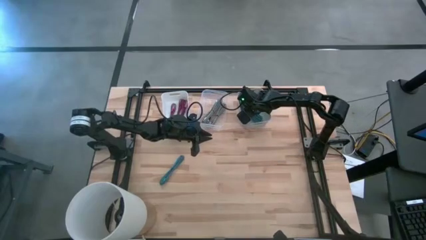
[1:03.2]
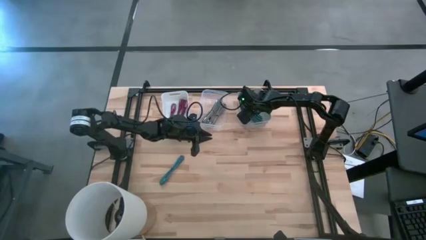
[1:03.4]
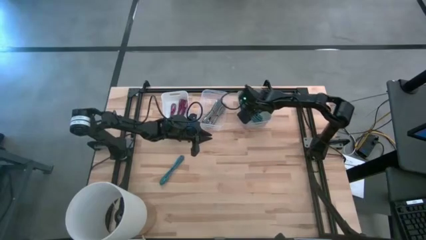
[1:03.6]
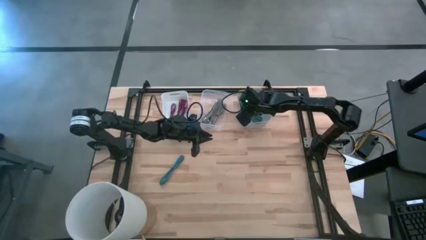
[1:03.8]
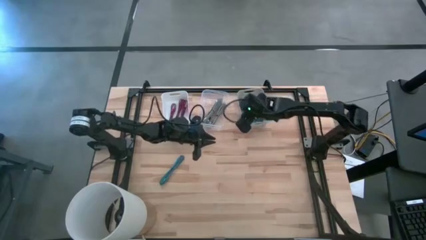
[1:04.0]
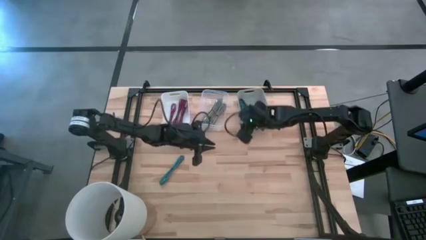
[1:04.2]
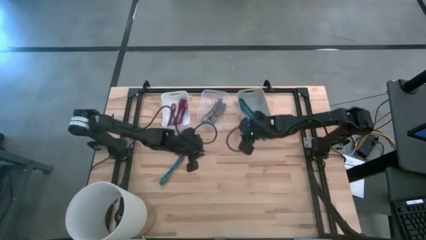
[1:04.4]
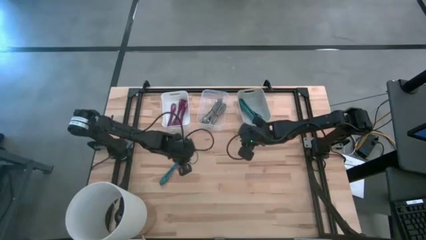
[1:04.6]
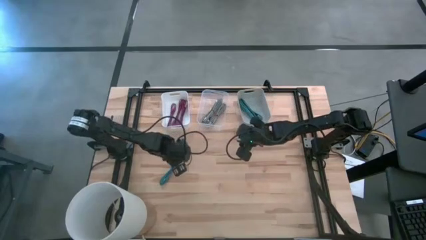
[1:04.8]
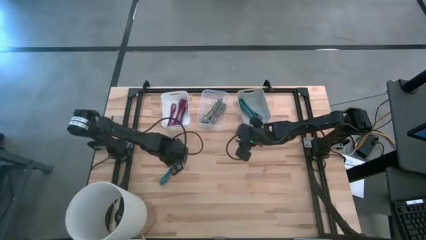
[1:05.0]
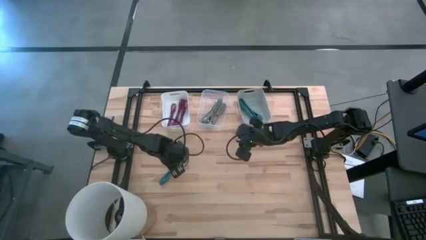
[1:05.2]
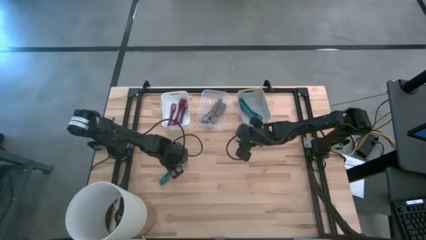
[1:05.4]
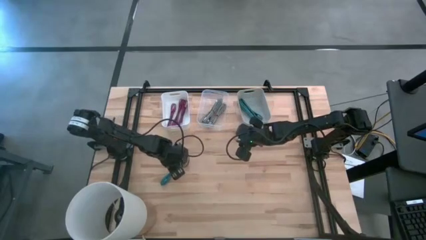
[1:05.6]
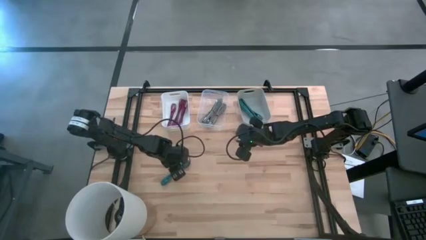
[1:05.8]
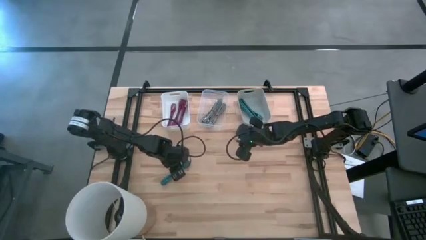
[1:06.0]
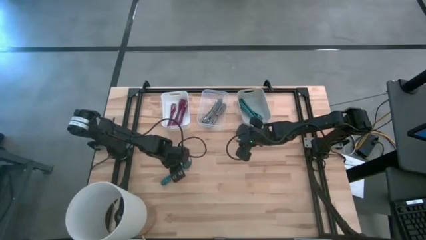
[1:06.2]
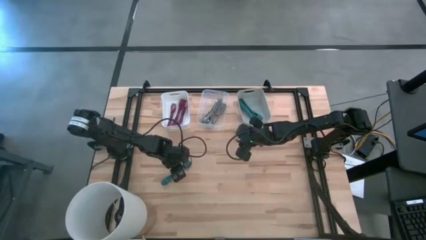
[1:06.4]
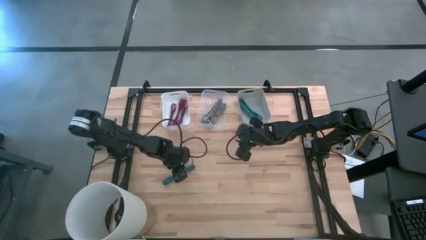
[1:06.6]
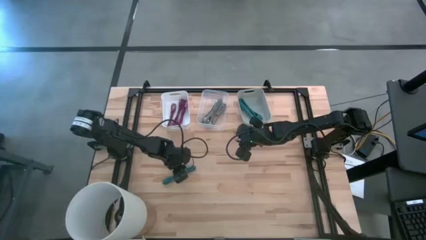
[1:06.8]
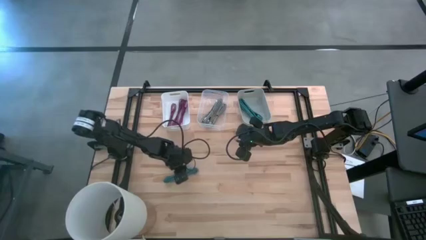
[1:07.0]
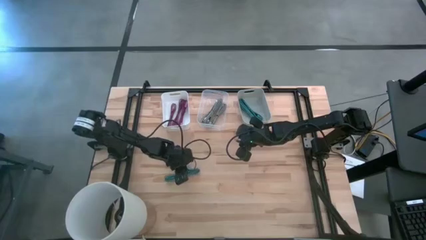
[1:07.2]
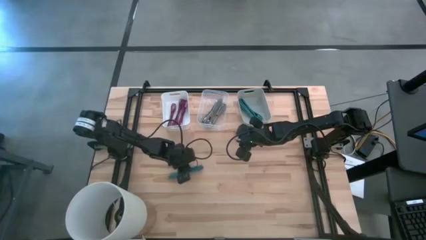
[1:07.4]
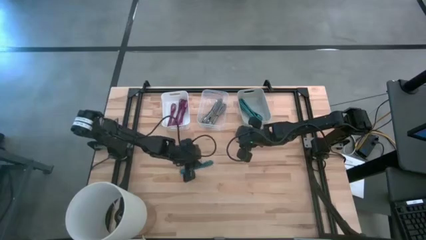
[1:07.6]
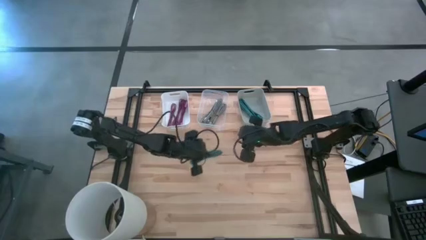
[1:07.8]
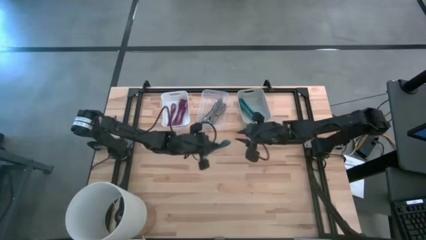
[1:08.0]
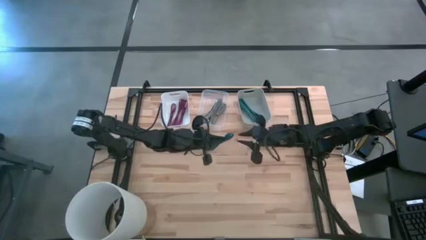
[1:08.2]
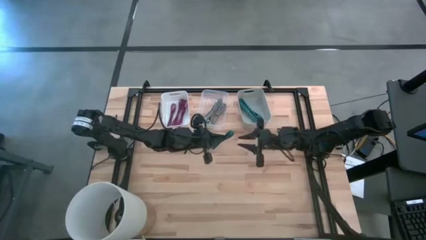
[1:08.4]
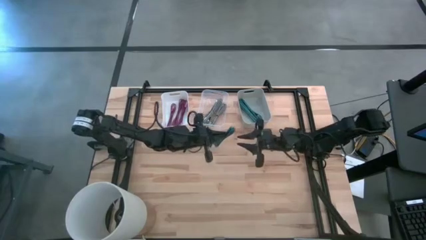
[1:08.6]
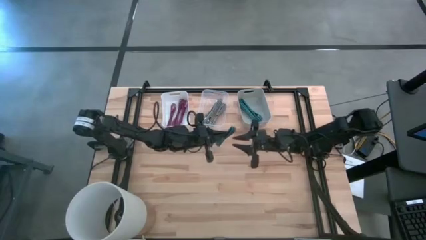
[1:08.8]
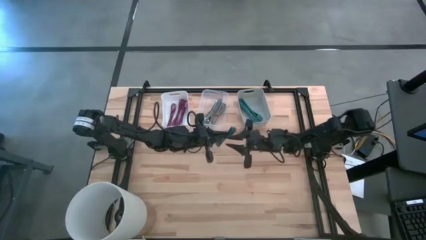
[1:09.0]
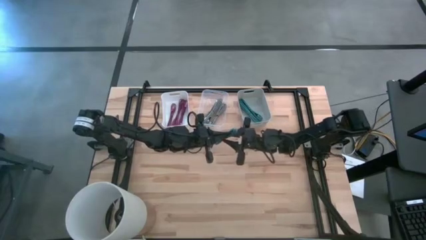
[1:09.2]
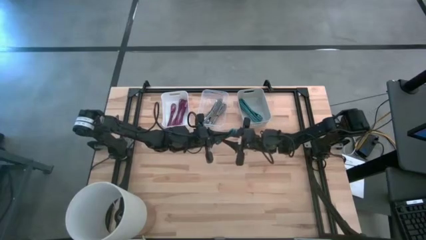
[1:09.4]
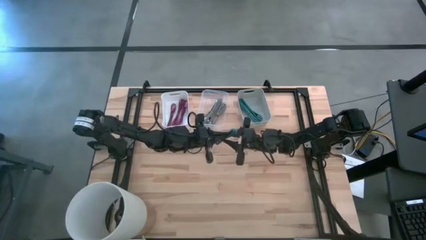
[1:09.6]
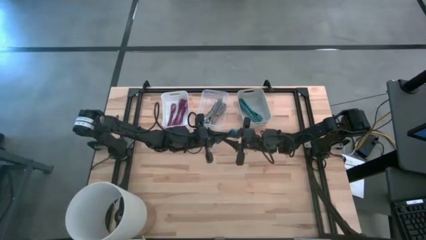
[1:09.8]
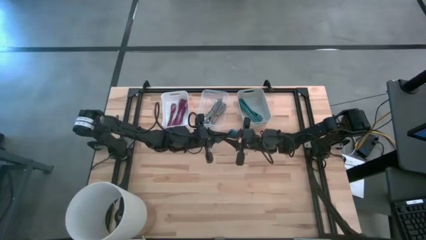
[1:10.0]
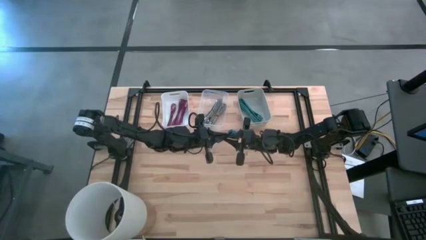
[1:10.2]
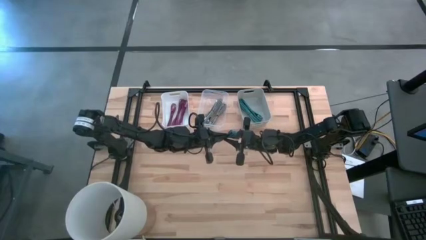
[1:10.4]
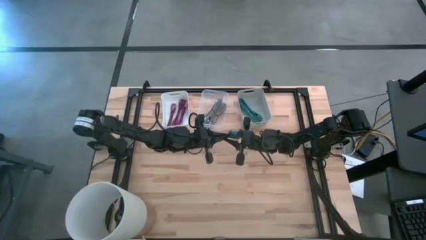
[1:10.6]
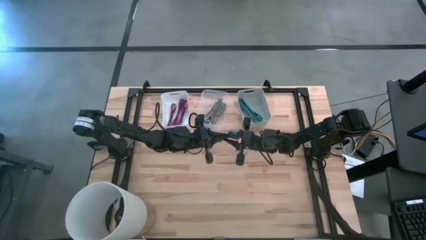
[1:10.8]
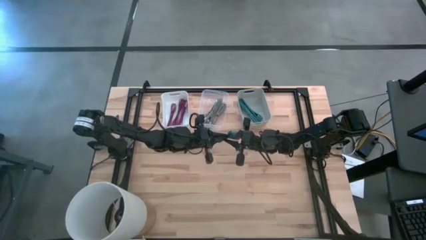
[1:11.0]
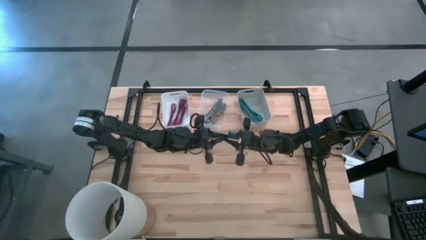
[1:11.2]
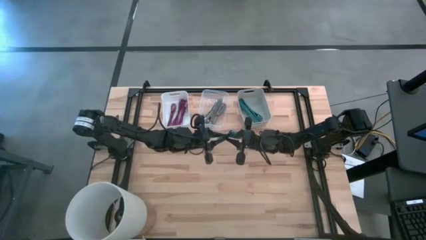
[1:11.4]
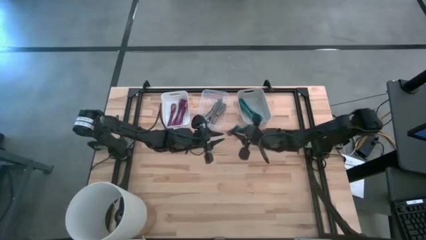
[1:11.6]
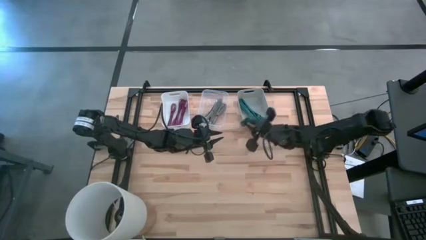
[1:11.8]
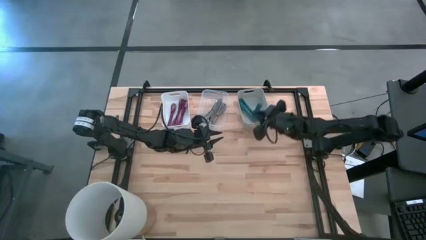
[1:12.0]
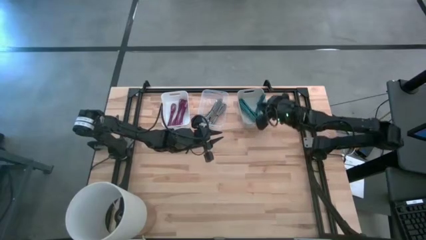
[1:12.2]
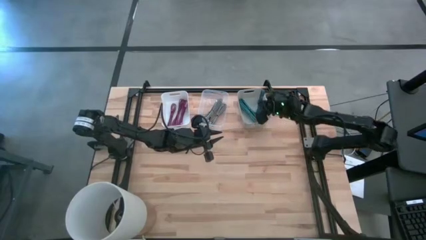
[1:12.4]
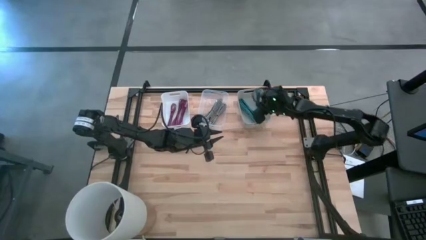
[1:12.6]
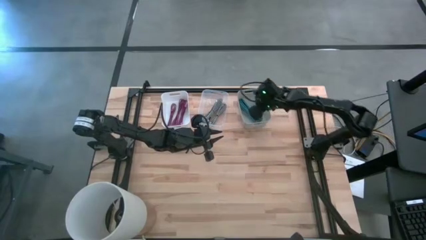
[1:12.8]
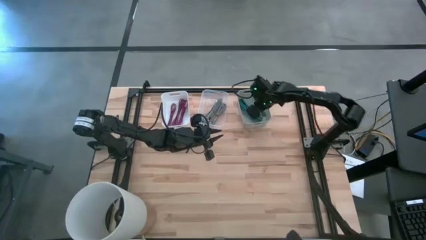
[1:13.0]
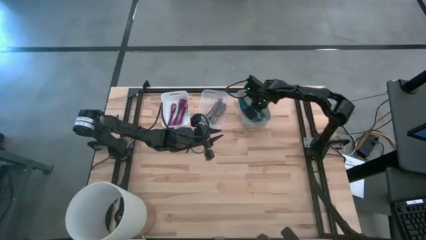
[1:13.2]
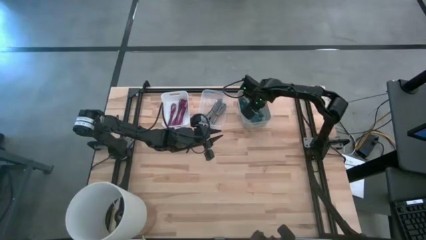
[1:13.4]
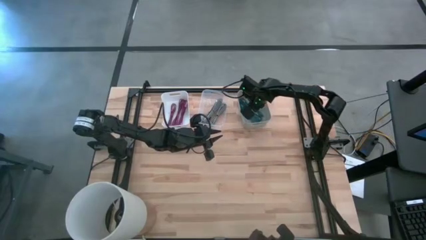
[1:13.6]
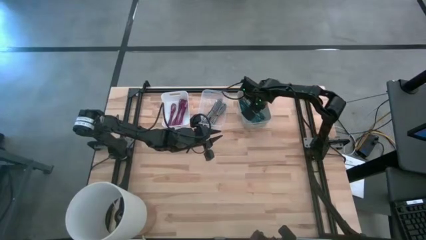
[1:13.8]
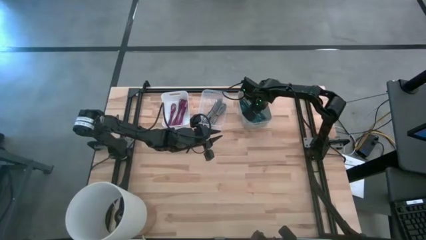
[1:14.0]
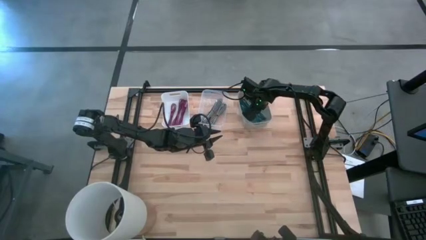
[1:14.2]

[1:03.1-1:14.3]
Task: Pick & Place USB Port
Put the blue charger cable into the gray bin

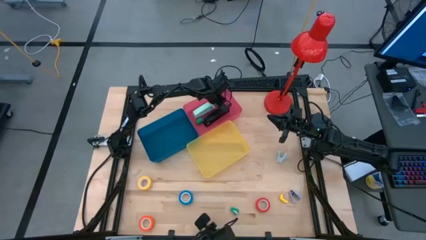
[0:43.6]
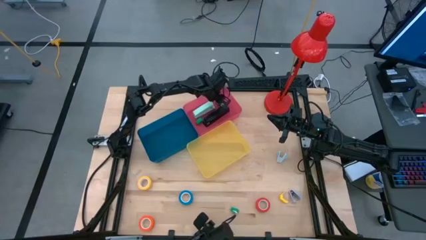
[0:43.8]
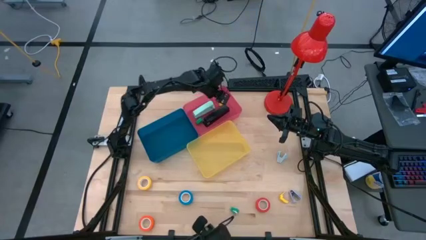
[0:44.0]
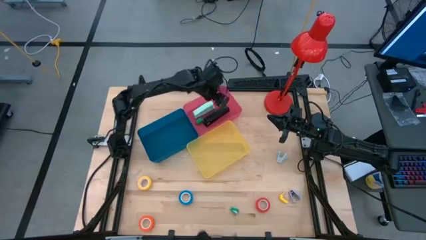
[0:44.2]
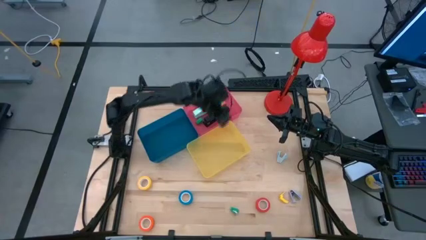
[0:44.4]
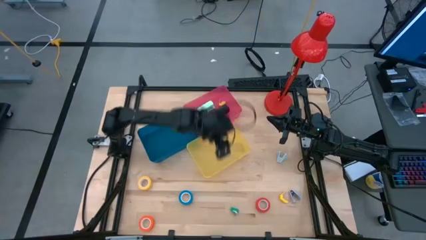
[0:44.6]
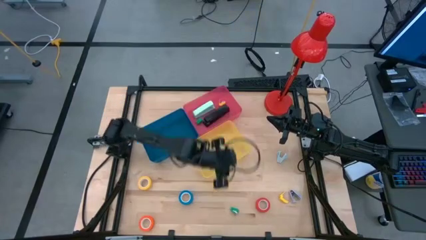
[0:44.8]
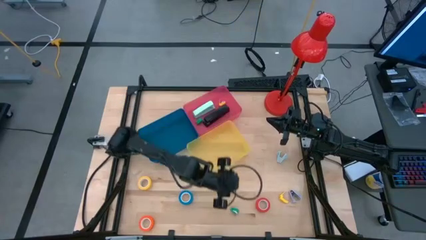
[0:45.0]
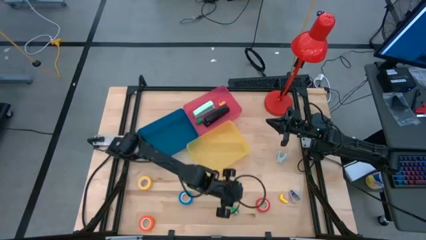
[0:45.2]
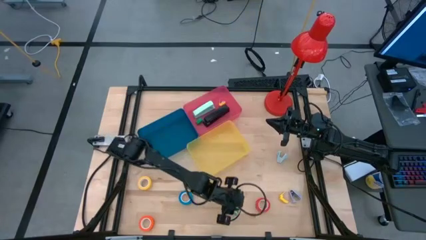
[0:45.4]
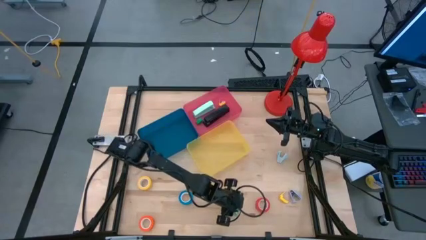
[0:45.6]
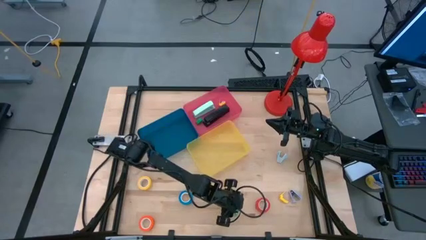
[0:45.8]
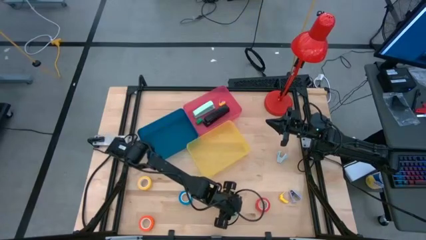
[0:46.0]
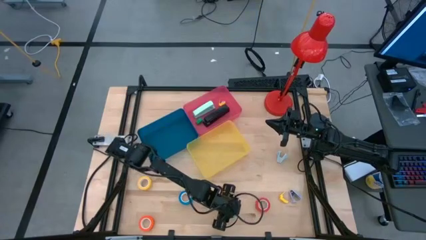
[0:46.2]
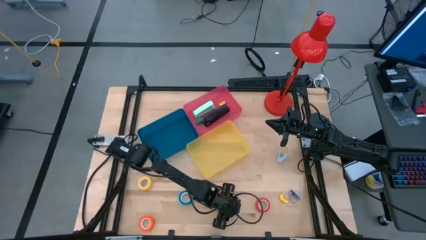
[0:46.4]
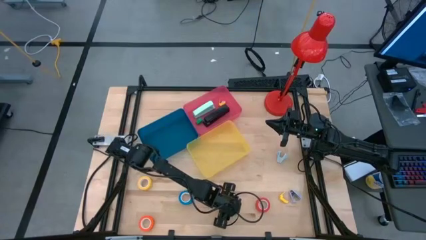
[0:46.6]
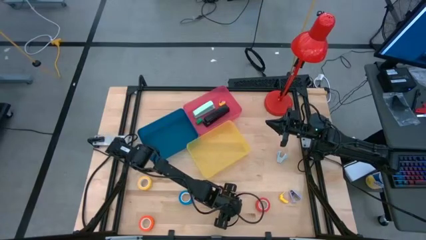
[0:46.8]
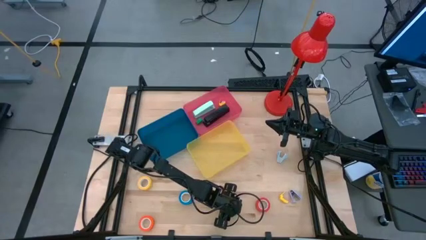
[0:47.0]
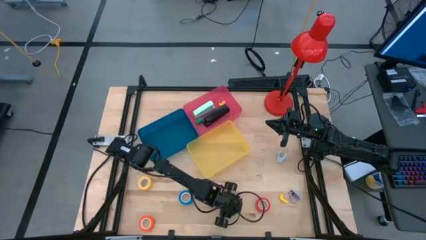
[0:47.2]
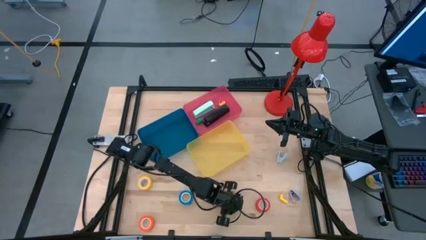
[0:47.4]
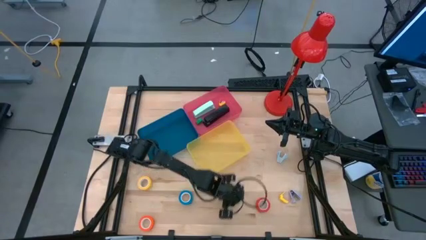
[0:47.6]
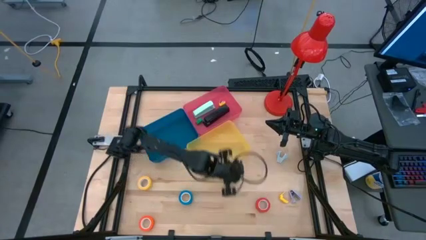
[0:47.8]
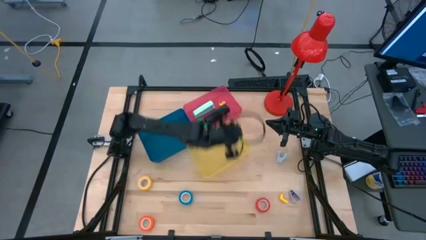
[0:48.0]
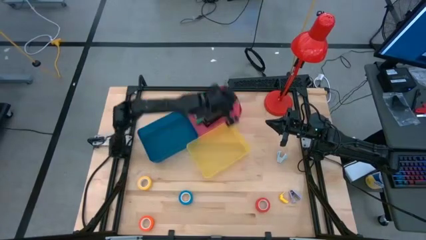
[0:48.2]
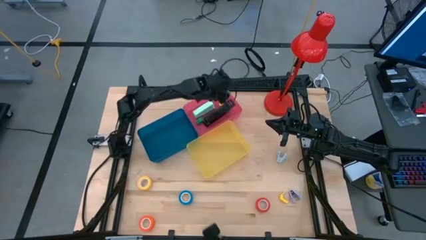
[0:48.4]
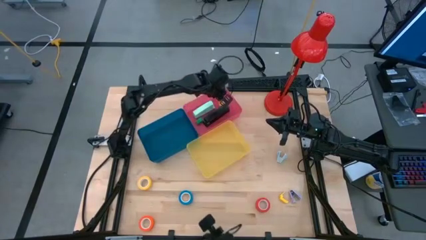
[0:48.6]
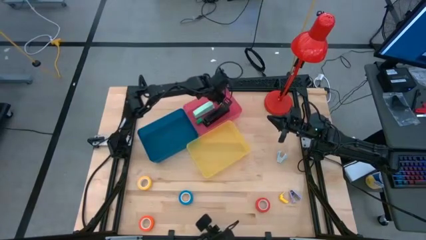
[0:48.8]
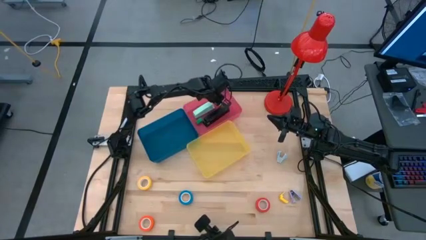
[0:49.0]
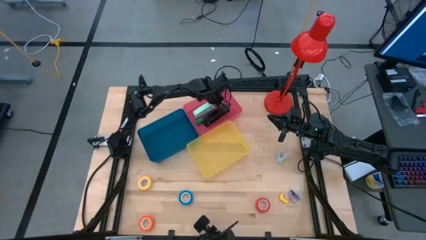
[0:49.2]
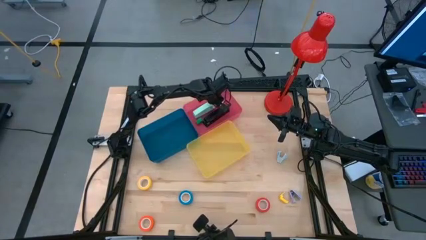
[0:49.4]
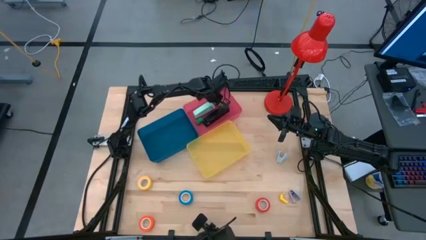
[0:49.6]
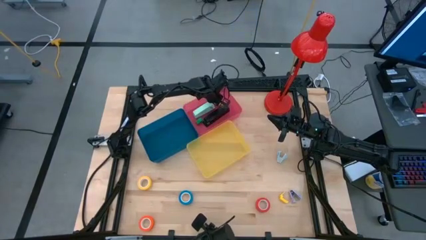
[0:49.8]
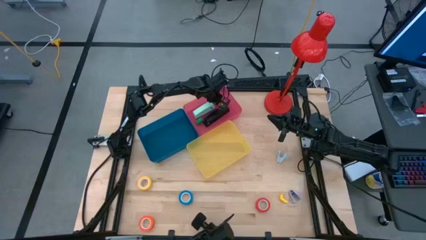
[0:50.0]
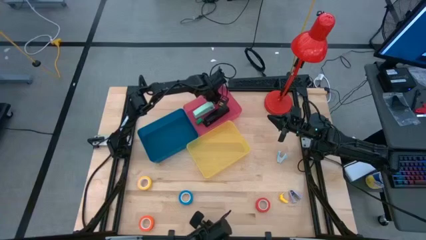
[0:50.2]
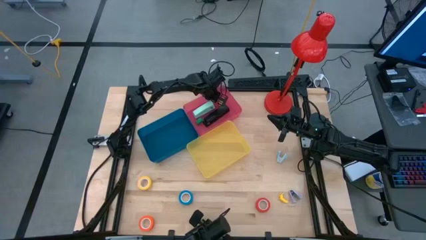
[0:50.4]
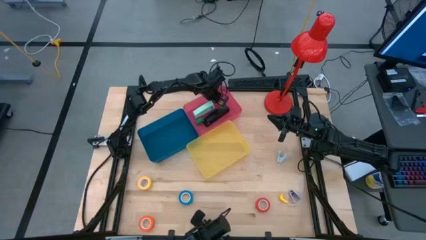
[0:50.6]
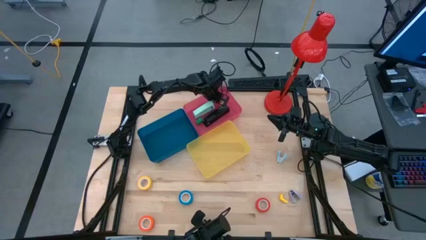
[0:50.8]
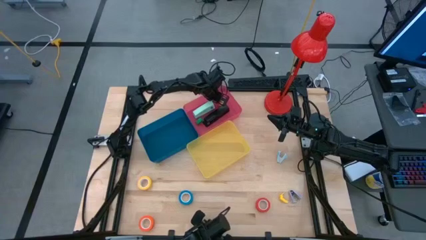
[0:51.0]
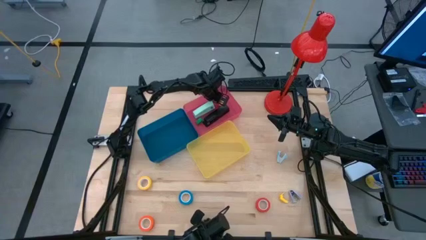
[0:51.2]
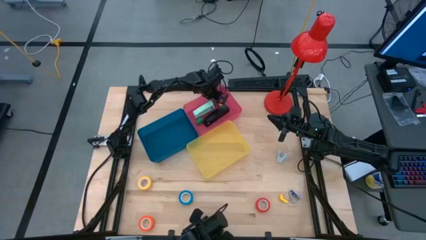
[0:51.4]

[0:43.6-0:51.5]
Task: Pick and place Stapler, Stapler remover, tape
Put the green stapler into the red bin
